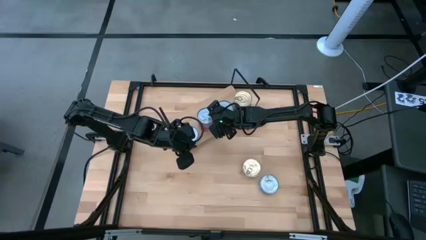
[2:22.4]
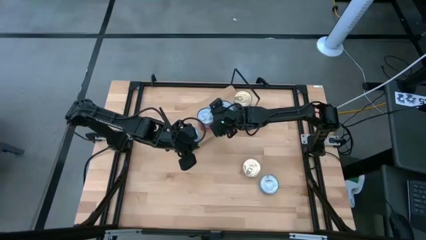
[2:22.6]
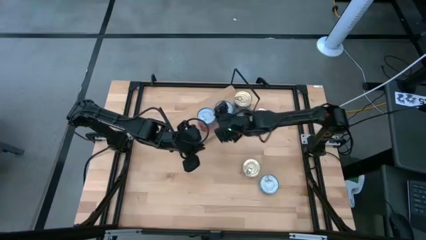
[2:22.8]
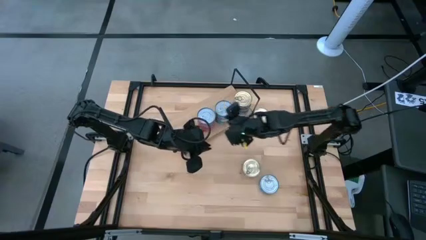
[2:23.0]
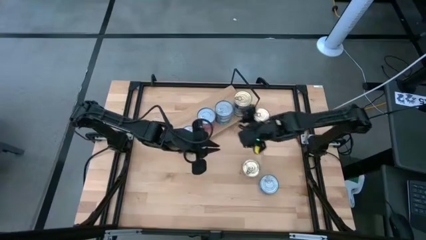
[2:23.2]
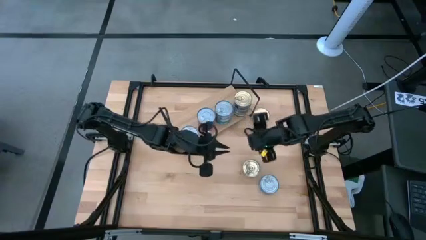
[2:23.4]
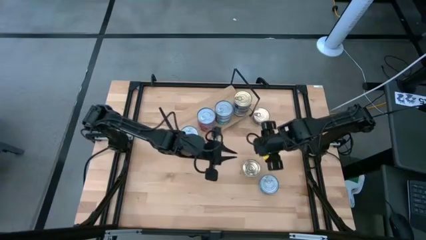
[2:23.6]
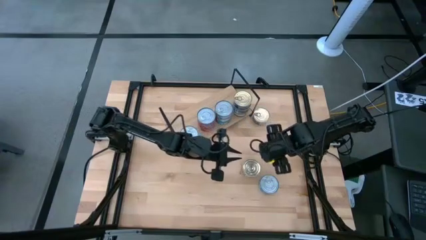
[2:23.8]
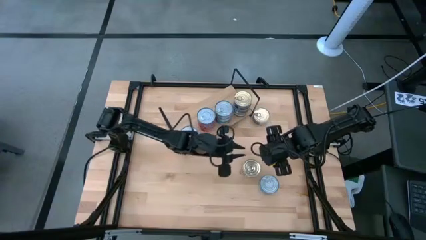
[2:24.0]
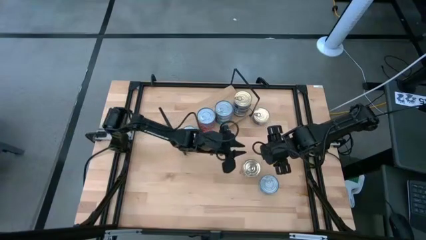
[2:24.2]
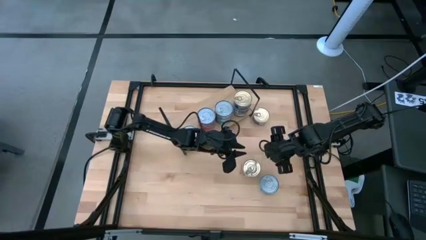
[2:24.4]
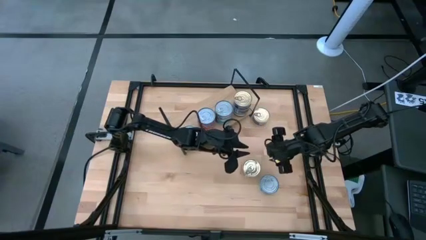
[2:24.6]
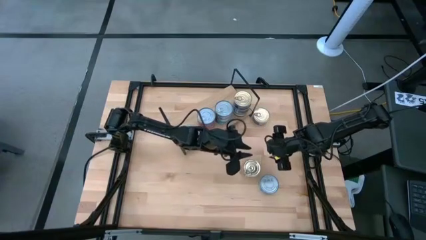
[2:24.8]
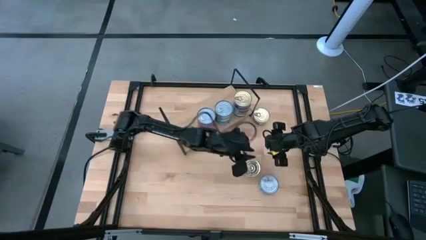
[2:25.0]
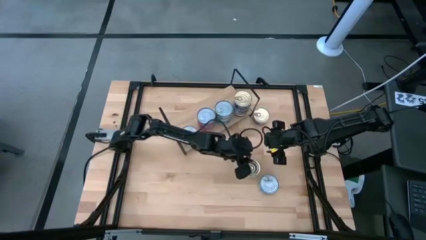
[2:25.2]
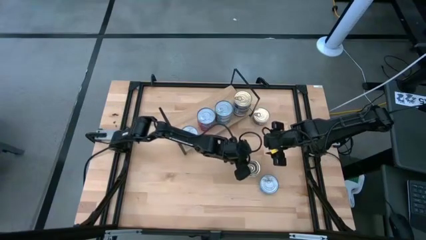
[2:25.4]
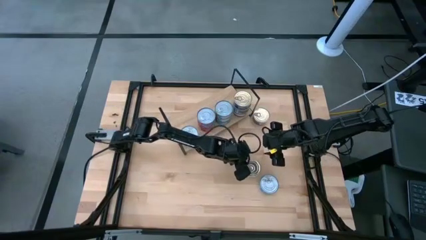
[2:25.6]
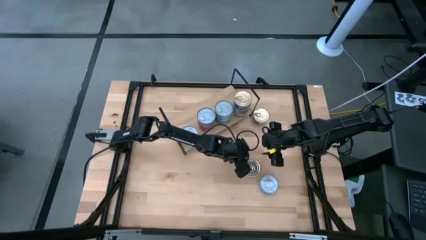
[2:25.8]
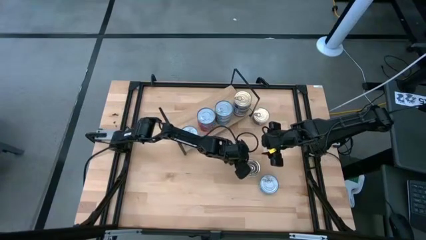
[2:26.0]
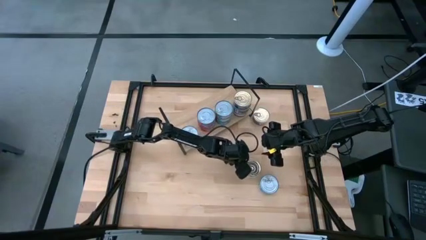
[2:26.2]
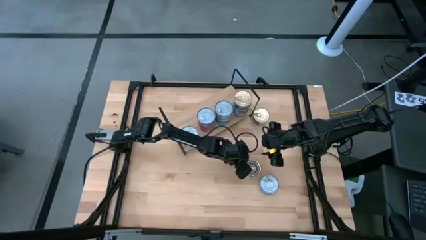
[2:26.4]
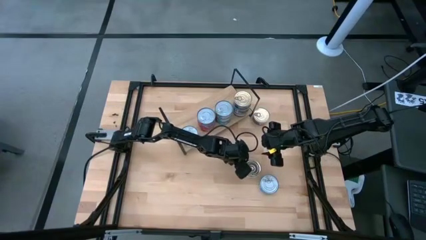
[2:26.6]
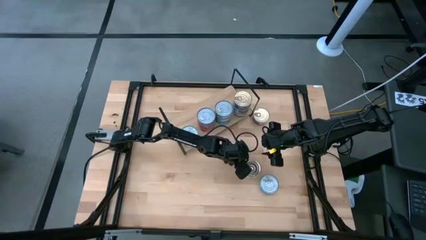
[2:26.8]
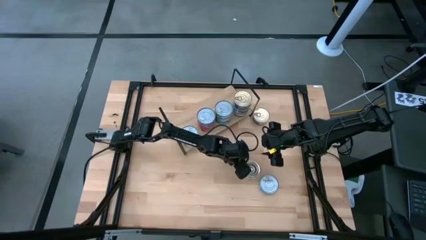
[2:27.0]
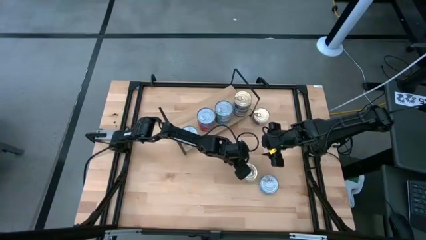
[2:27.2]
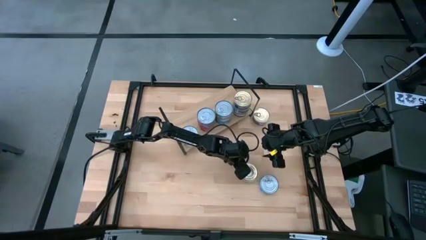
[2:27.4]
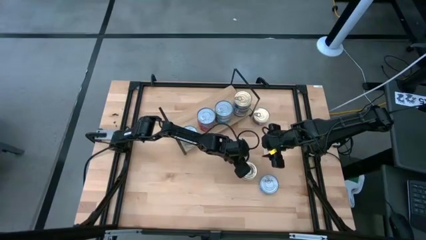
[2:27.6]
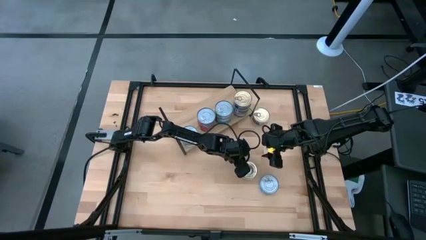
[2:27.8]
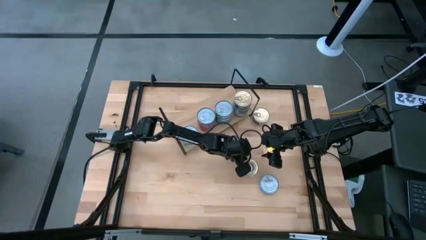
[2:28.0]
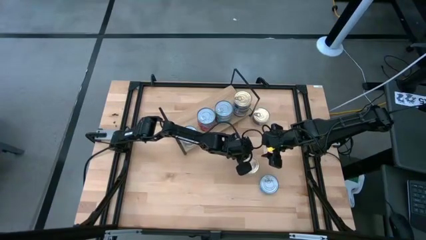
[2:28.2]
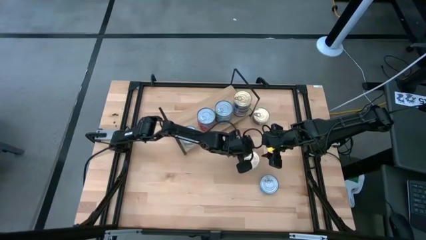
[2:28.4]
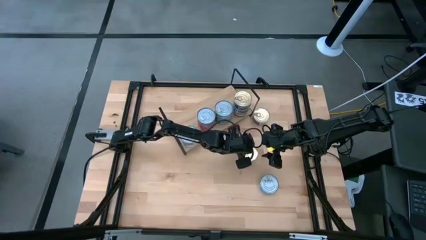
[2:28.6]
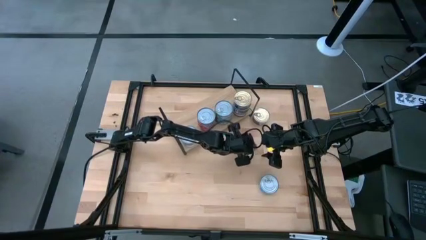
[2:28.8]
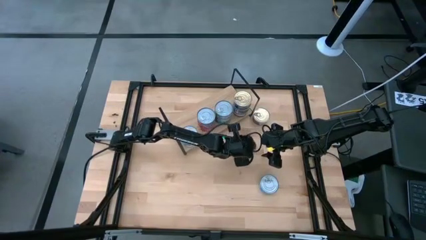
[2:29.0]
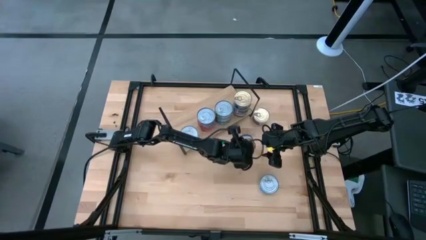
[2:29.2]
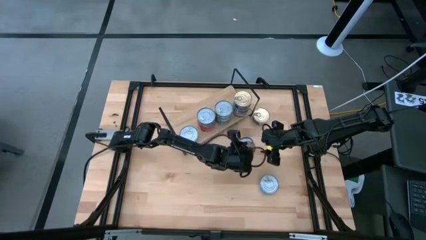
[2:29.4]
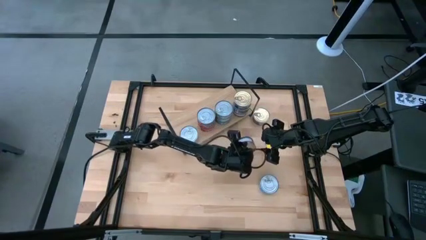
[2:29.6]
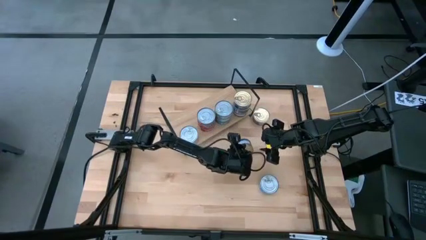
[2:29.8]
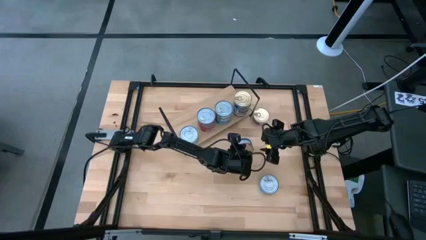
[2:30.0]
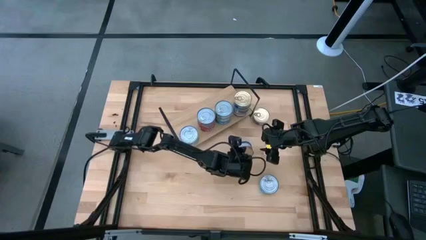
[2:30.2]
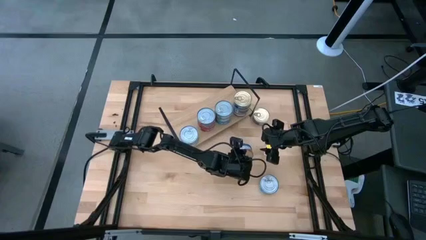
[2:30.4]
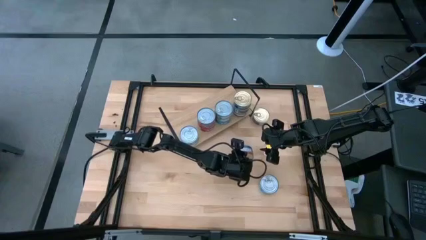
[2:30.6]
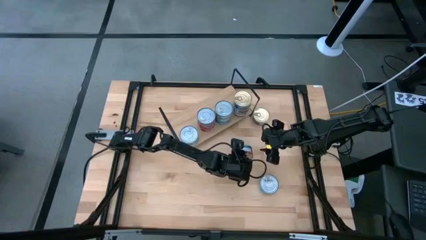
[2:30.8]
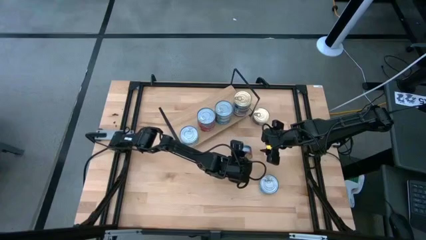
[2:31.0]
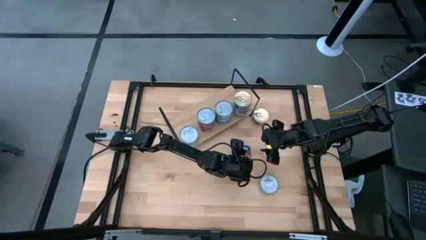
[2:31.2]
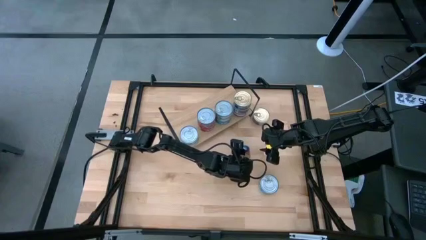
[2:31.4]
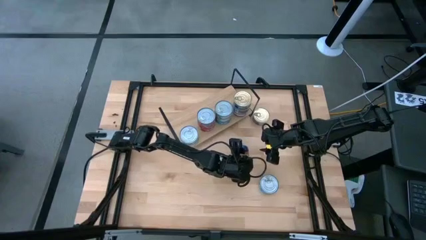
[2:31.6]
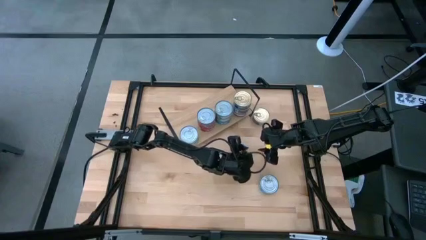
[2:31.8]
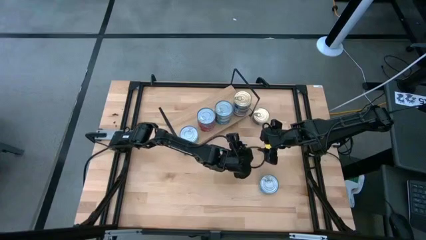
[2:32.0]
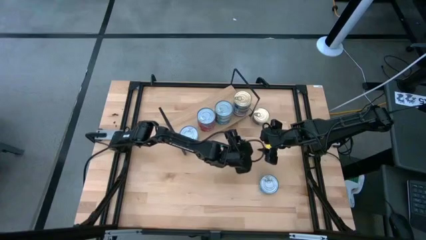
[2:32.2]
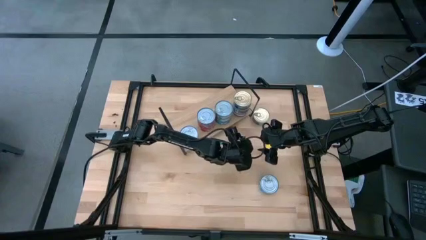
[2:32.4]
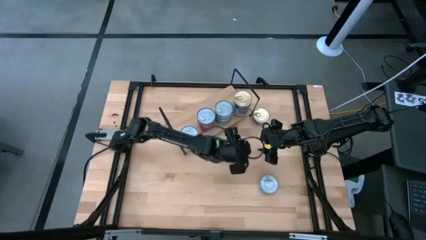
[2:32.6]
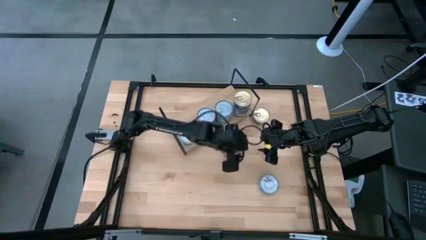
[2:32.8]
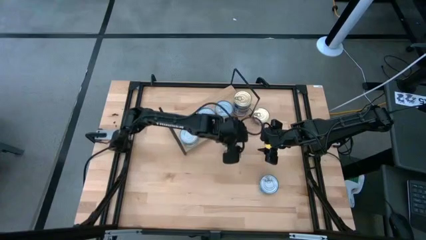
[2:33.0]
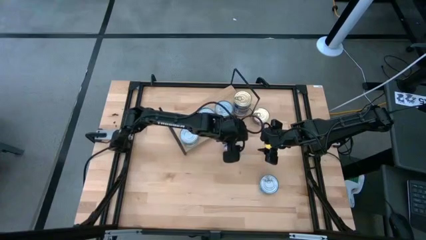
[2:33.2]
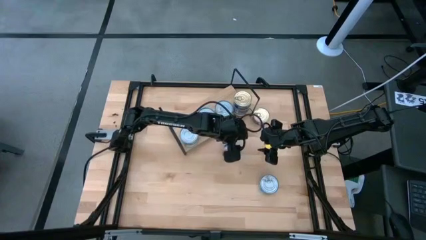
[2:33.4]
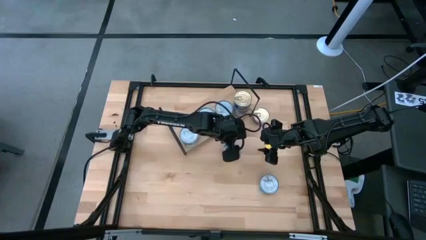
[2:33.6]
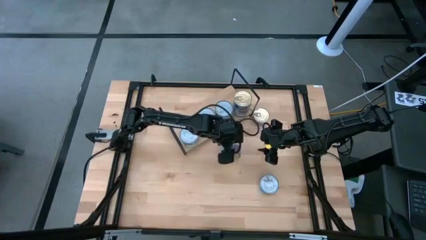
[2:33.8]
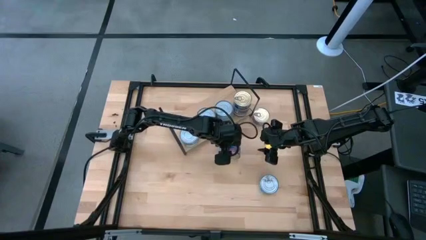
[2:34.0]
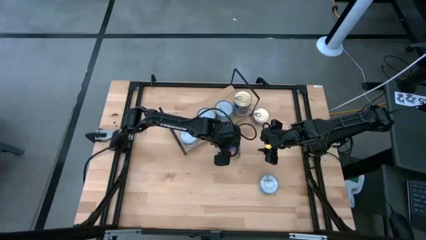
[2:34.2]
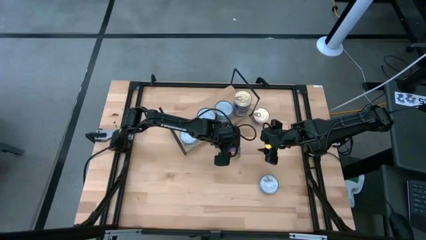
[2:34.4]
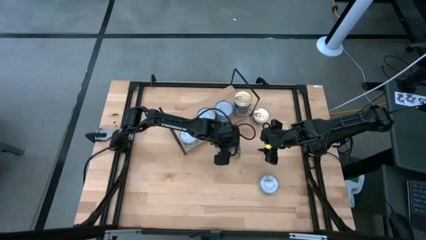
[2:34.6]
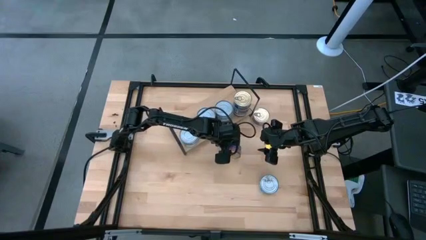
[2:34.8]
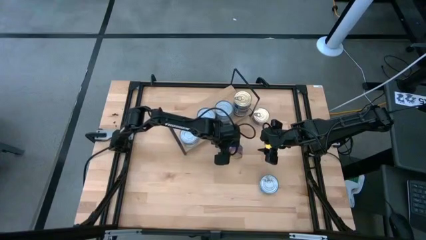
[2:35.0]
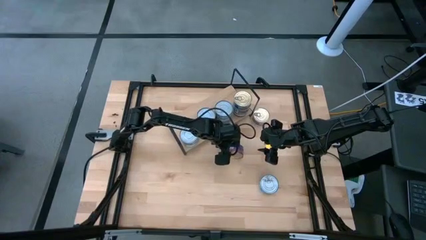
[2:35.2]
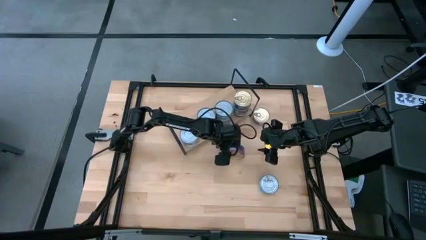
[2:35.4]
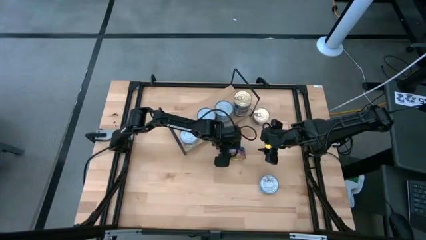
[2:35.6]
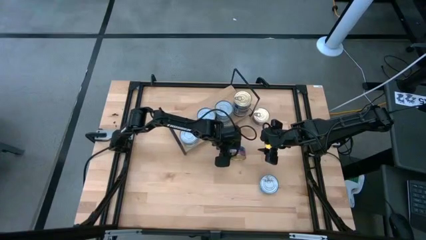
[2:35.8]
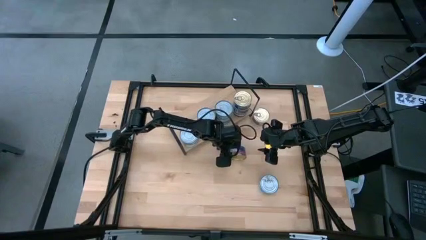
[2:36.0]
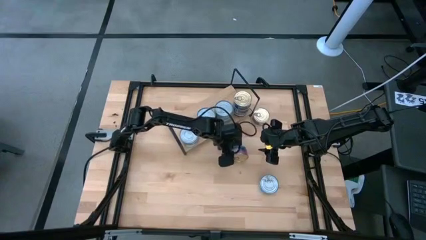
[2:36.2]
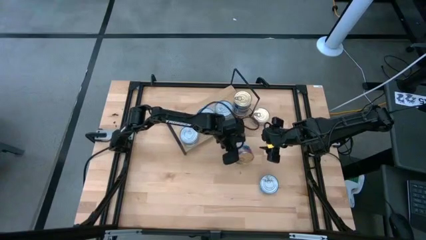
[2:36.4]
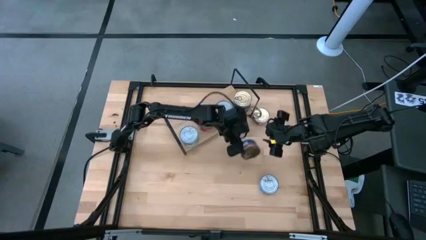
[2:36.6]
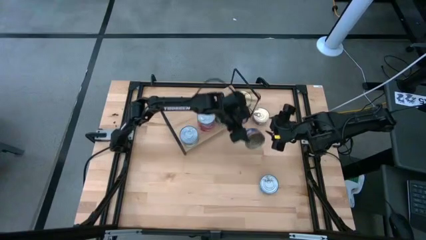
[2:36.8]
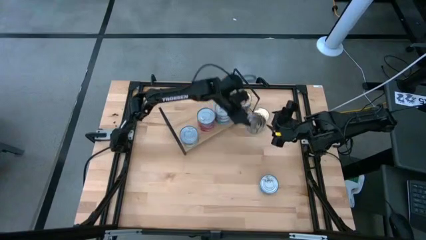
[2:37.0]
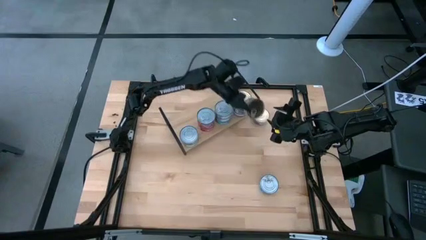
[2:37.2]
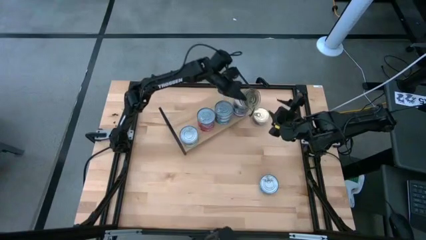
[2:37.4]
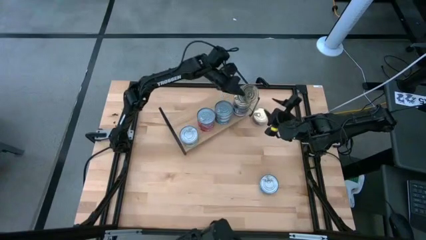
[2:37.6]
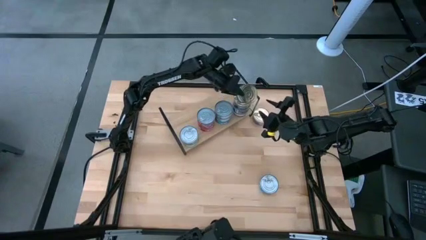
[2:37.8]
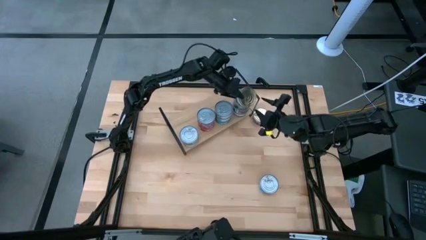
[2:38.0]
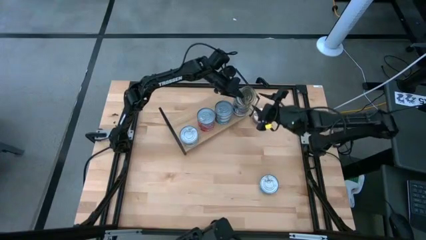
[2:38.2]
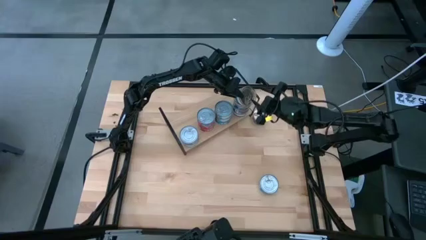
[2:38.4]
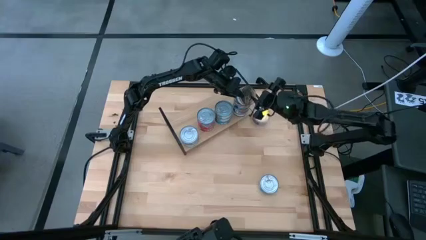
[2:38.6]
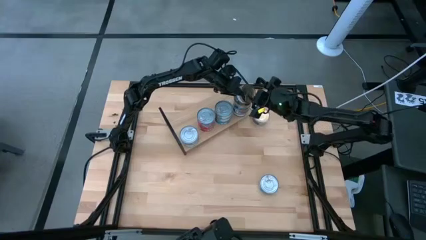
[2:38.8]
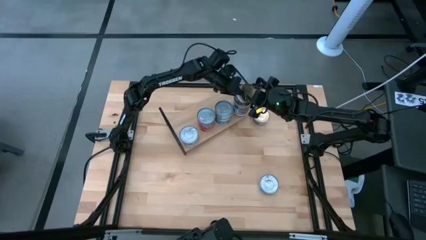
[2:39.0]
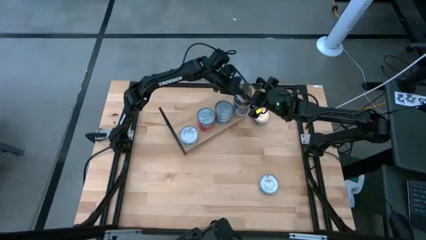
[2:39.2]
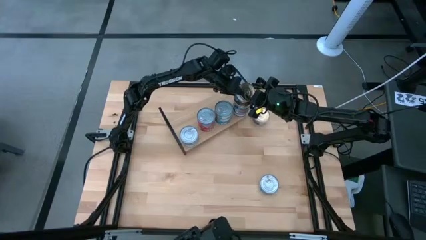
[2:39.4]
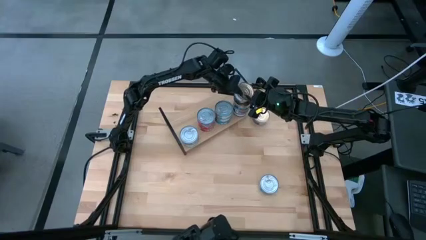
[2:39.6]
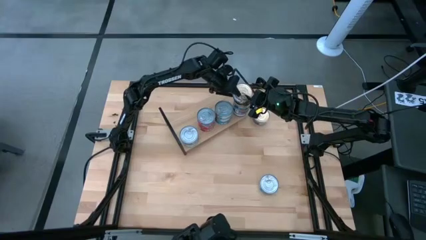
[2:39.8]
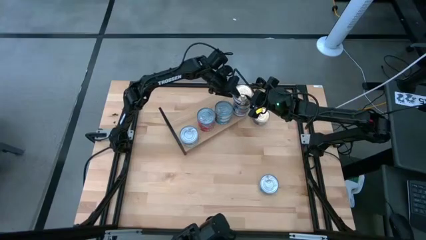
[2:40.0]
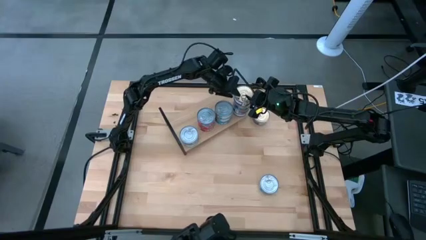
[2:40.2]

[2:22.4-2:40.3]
Task: Stack canned seafood by type on shelf
Stack the blue pink tuna can on top of the blue pink tuna cans on the shelf
